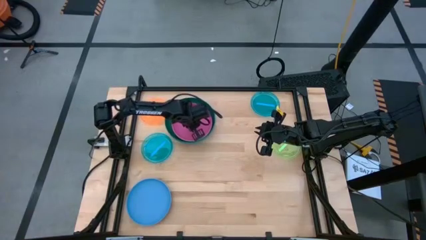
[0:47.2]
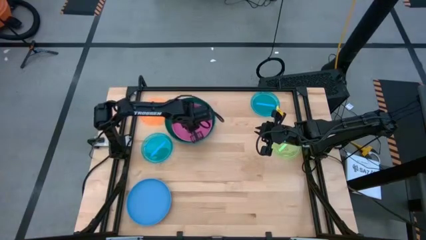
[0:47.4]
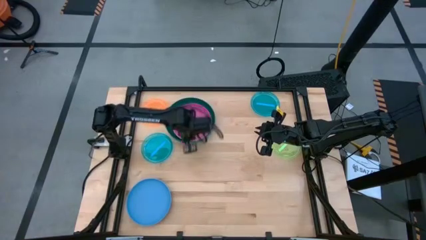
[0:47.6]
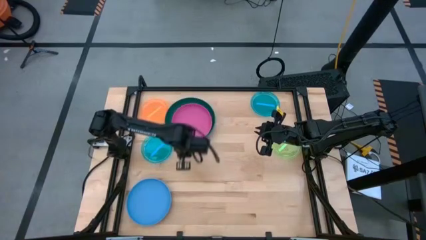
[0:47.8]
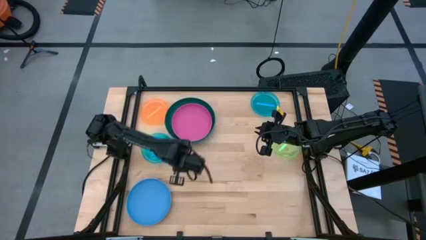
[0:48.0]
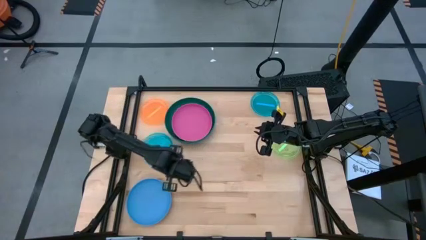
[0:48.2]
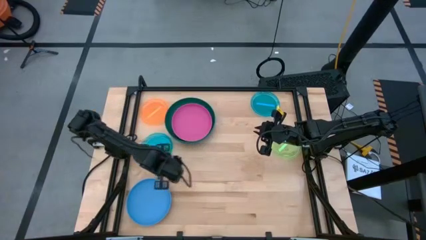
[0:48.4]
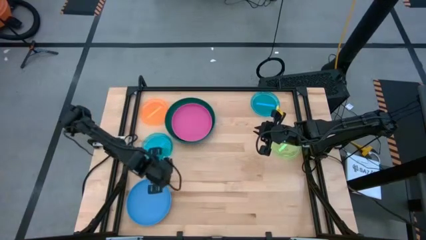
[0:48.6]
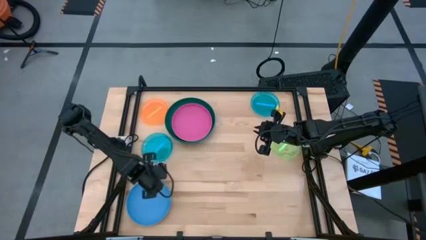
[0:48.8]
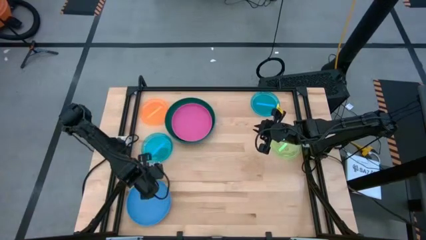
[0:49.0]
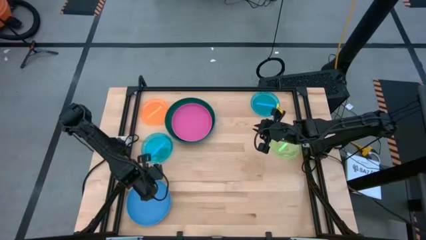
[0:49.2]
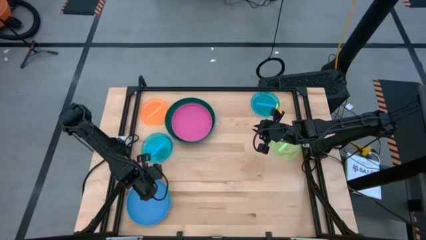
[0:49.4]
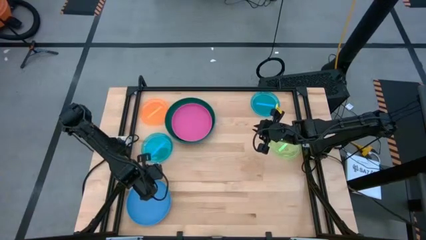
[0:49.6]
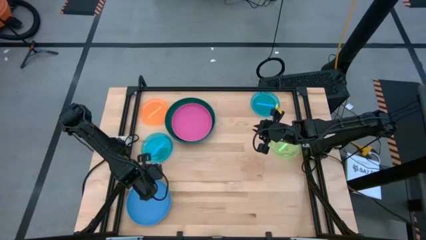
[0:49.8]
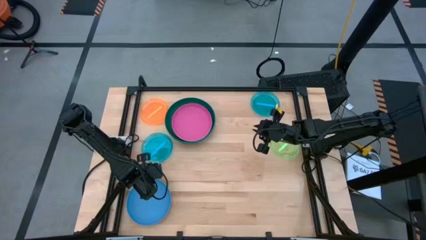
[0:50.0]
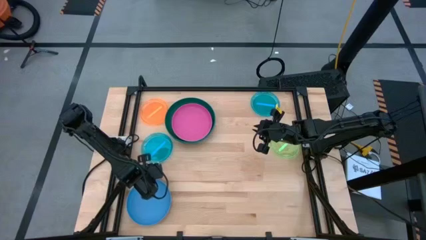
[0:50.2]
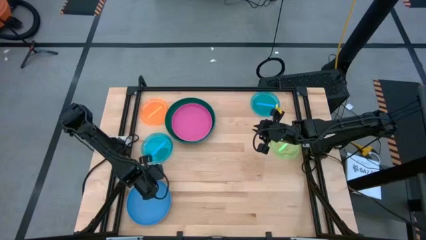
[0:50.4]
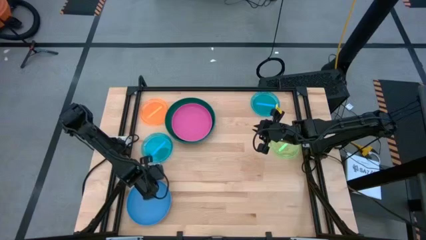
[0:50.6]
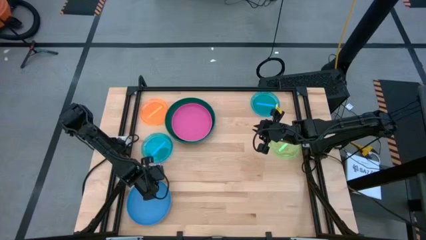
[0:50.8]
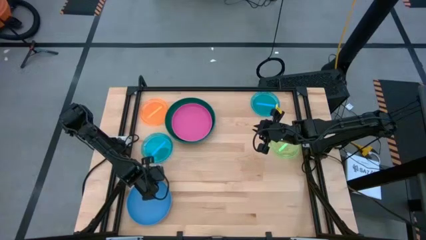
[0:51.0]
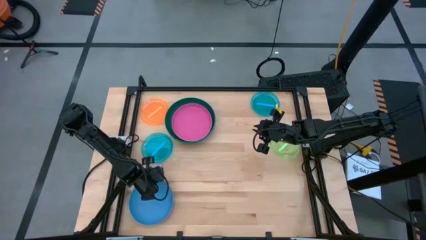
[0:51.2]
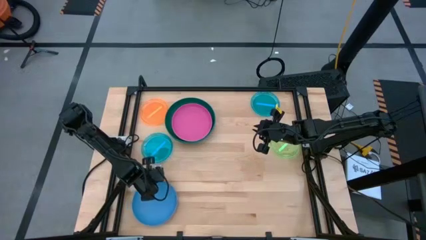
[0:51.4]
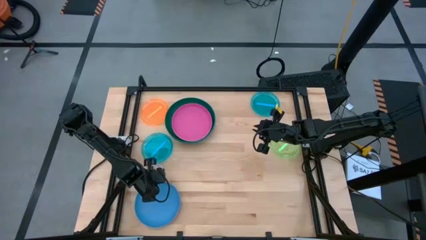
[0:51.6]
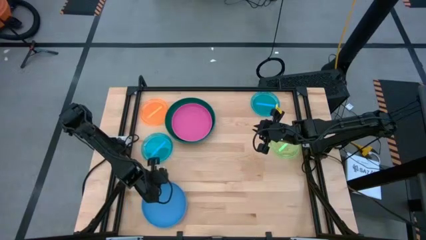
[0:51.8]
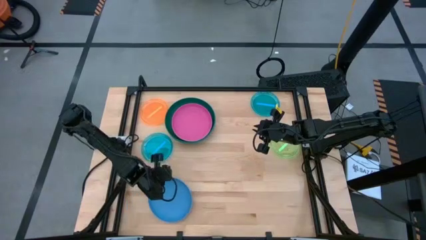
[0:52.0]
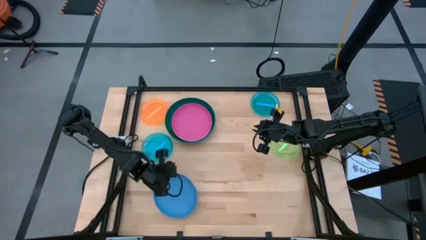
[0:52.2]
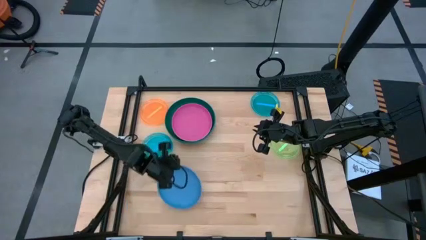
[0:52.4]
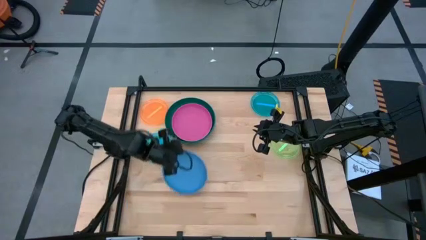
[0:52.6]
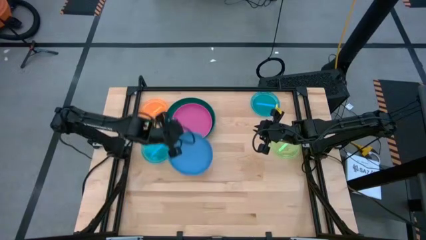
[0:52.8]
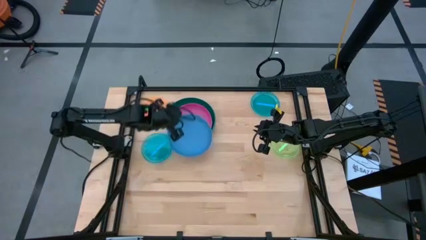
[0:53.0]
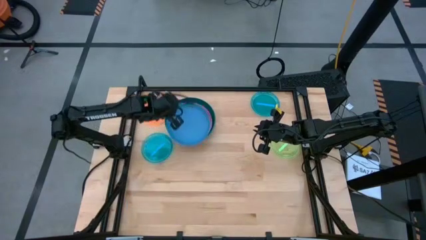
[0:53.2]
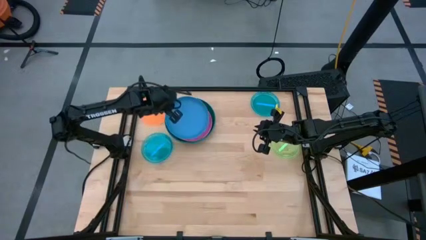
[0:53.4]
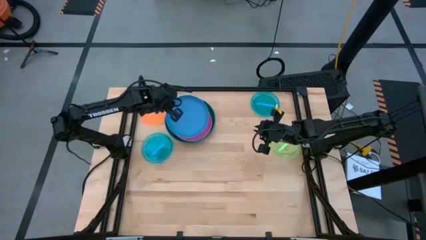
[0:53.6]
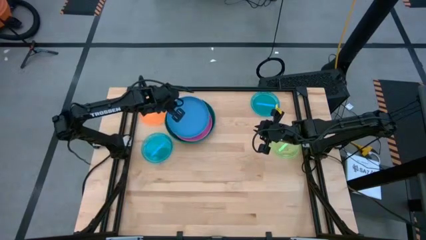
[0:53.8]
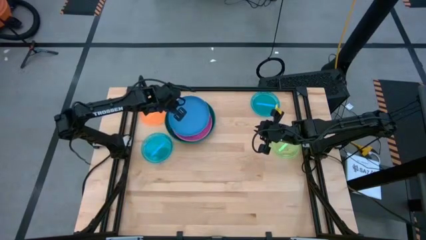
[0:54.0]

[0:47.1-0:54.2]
Task: Stack plastic plates
Stack the medium light blue plate on top of the medium pink plate

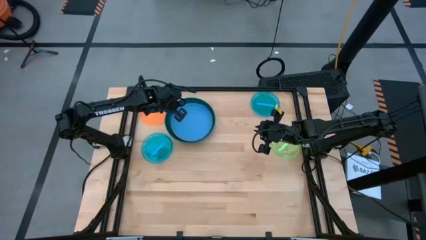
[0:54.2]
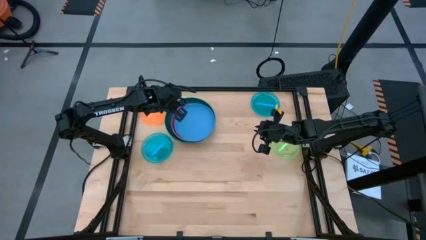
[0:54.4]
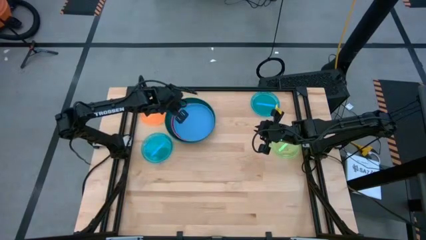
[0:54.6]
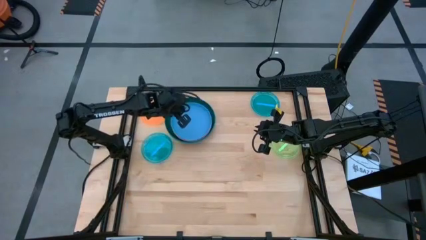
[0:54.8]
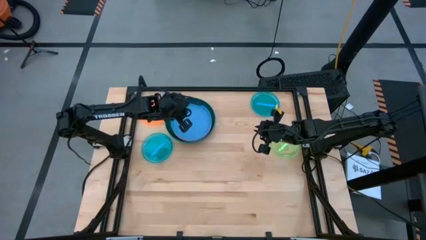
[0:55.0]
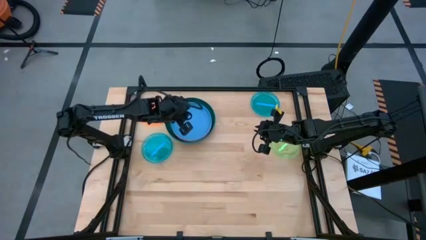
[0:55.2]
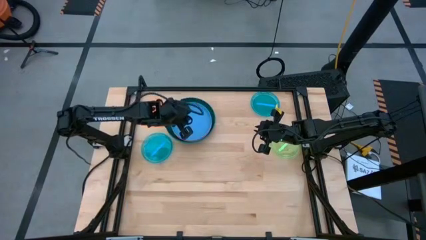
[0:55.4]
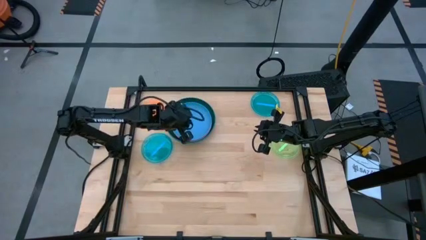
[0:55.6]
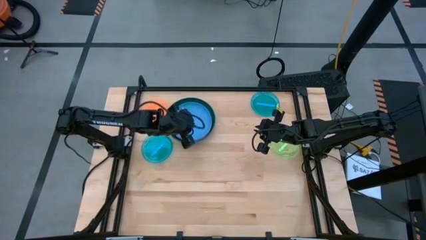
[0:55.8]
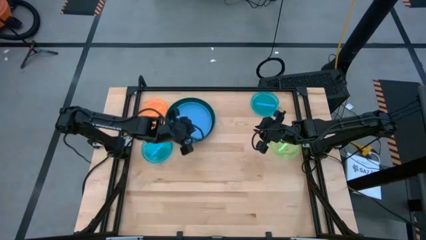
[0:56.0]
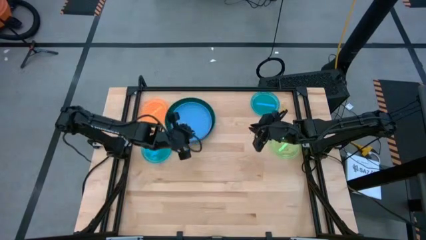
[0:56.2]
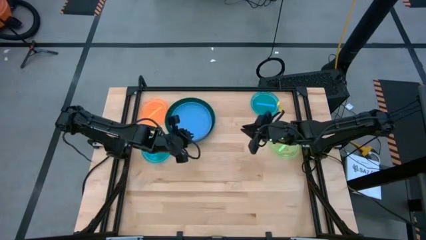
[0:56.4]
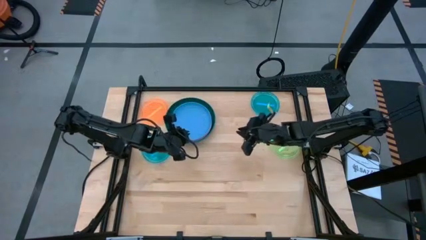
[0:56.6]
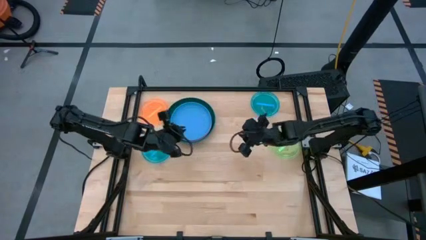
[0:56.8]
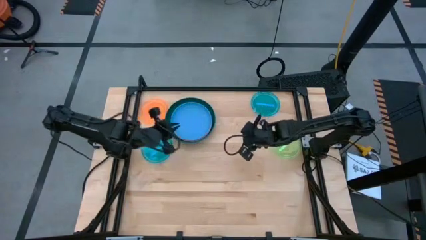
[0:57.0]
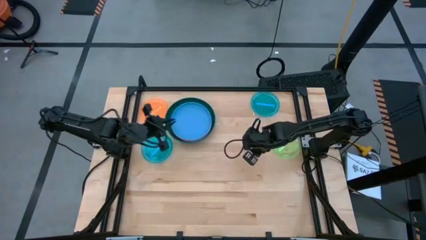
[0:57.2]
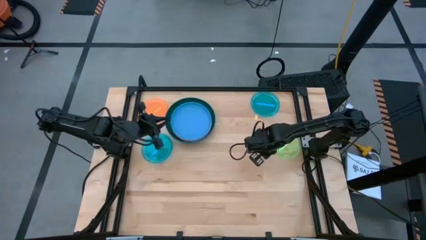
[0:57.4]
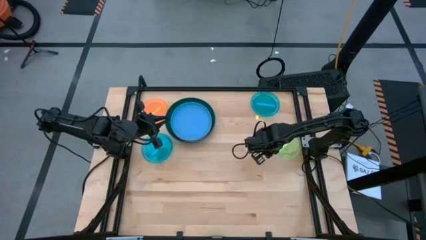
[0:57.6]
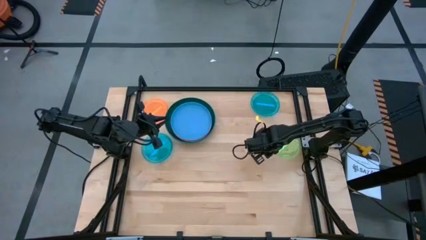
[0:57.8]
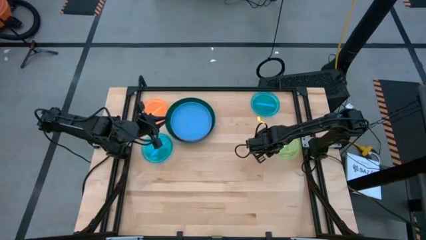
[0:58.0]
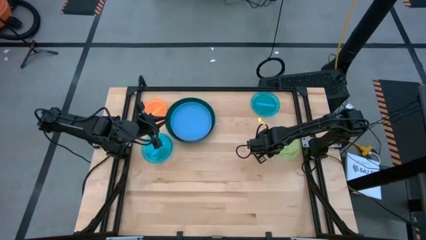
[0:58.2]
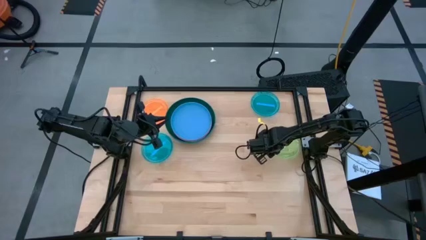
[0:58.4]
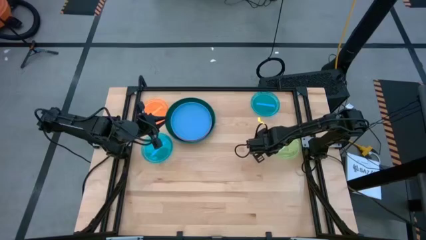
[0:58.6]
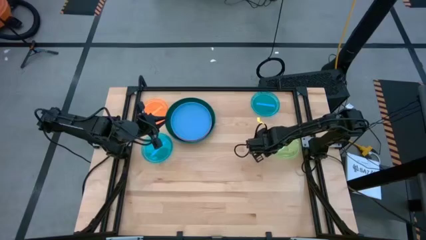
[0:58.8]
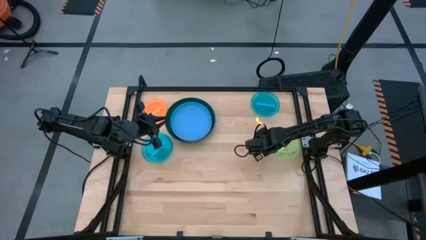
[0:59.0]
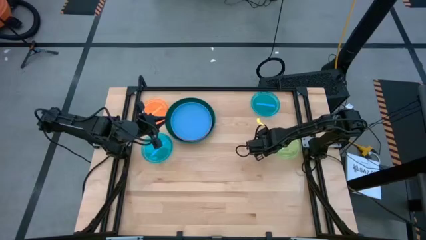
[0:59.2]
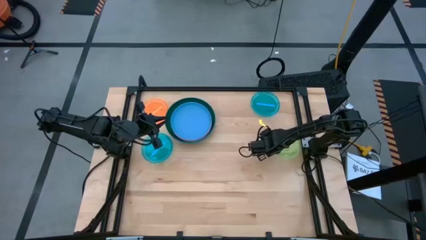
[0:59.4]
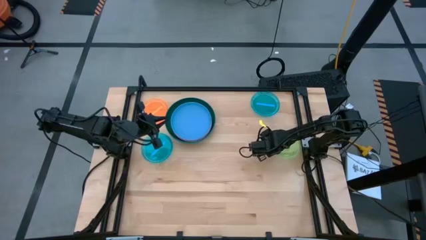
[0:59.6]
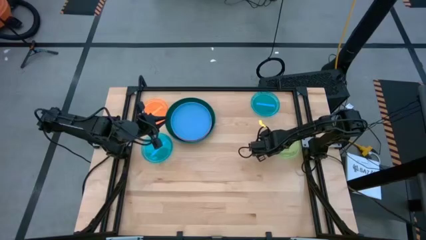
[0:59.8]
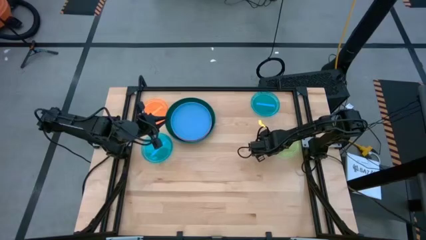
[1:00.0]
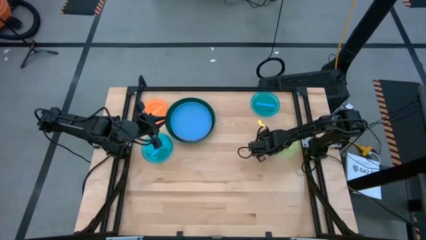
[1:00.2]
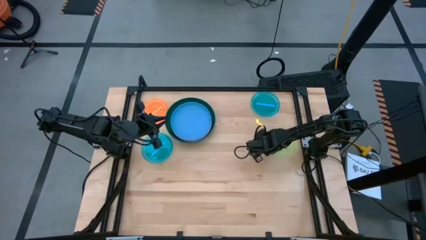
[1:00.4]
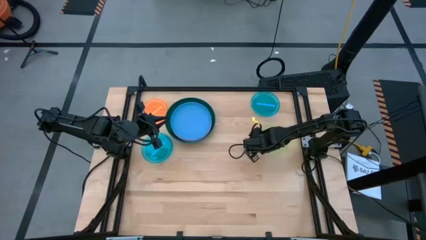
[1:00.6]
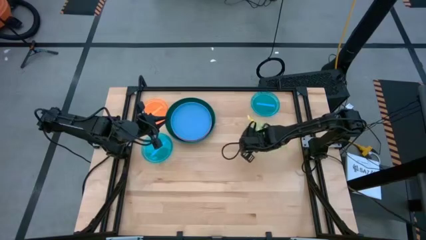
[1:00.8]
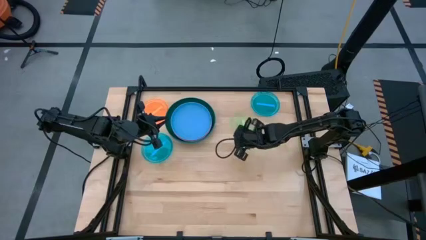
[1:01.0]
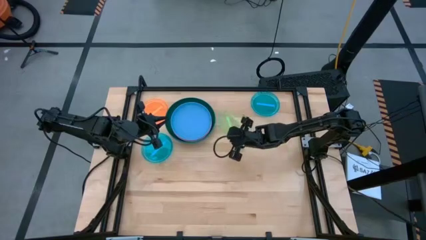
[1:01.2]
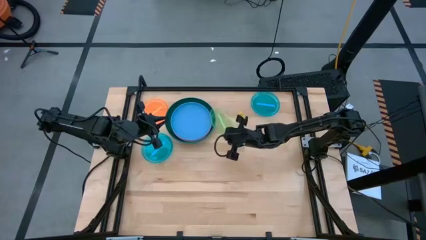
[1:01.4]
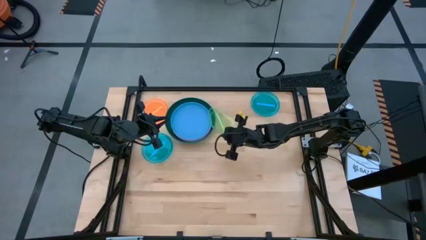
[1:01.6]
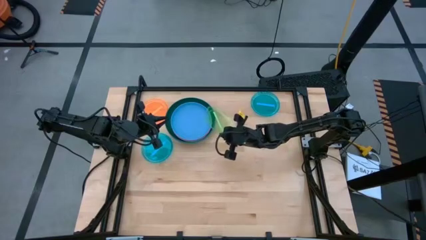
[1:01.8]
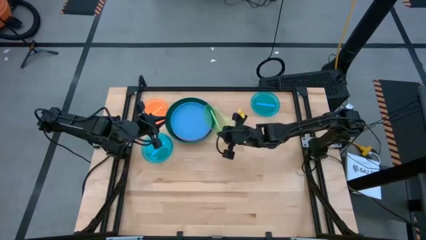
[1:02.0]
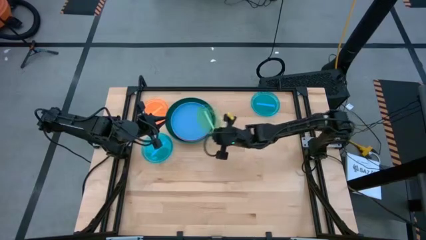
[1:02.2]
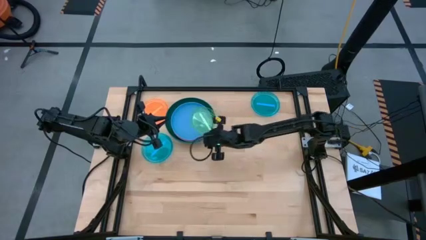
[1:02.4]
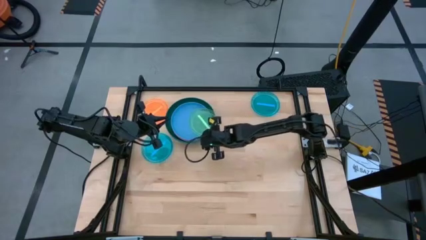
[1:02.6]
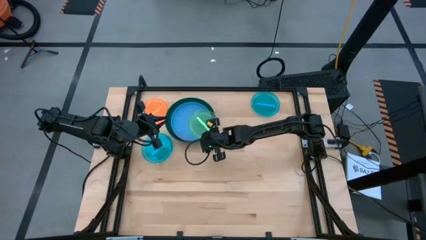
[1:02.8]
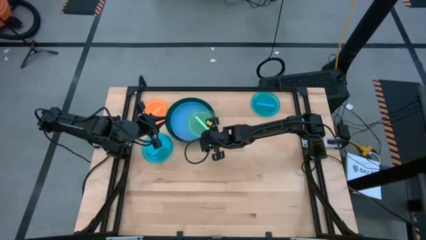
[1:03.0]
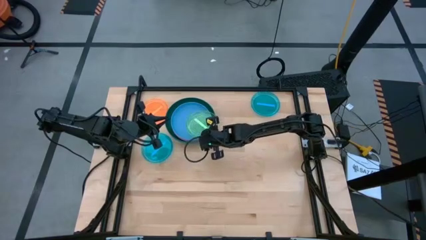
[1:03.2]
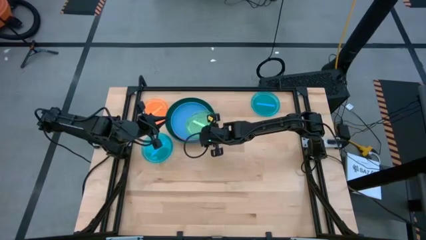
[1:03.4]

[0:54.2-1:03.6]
Stack the small green plate on top of the medium light blue plate
